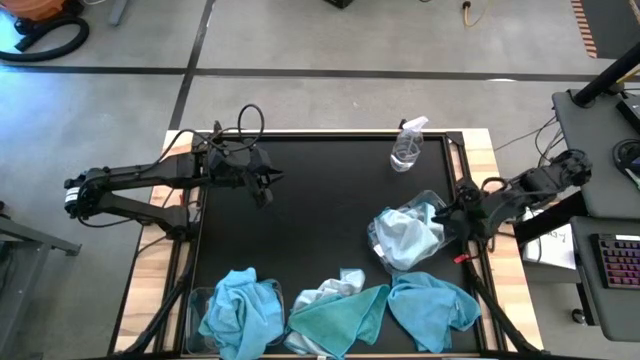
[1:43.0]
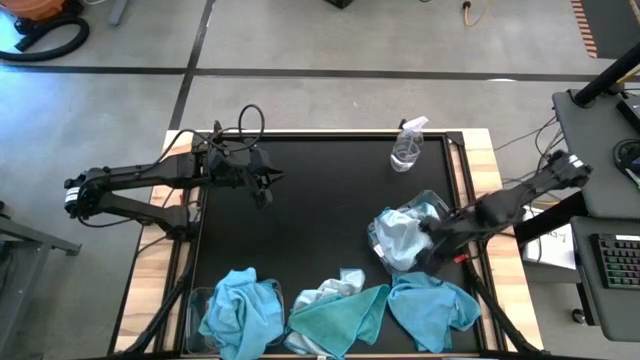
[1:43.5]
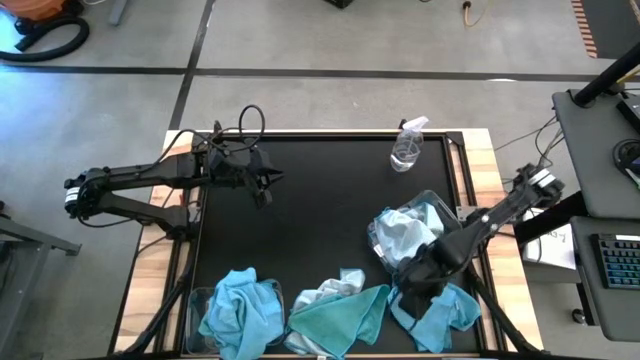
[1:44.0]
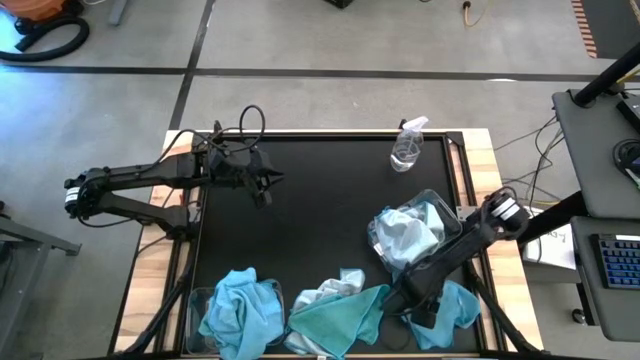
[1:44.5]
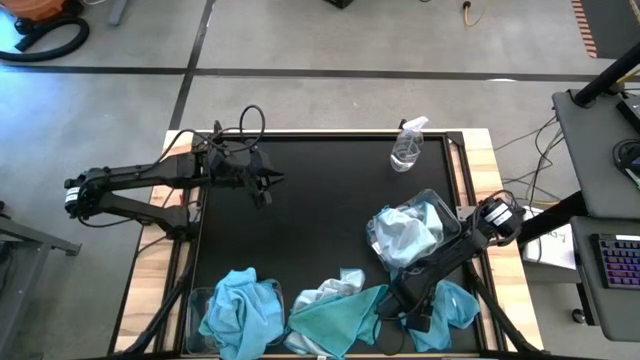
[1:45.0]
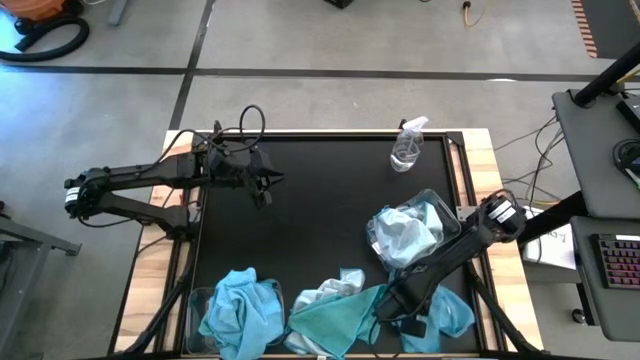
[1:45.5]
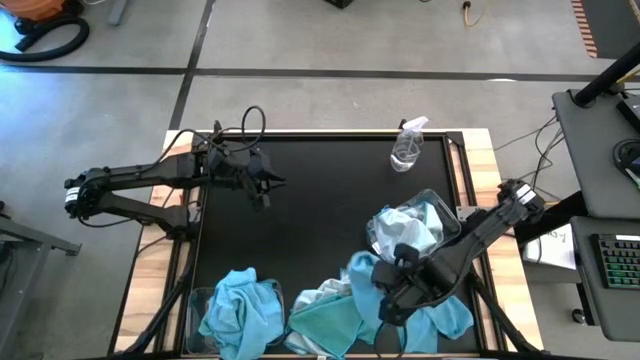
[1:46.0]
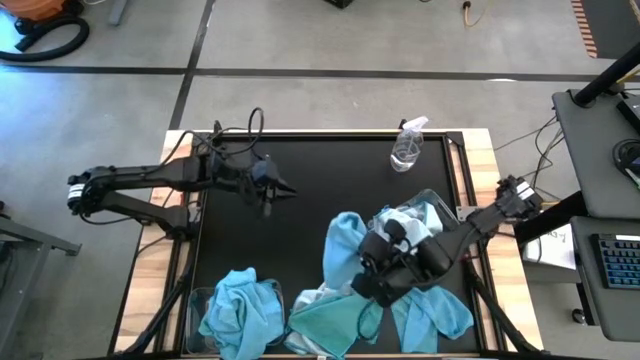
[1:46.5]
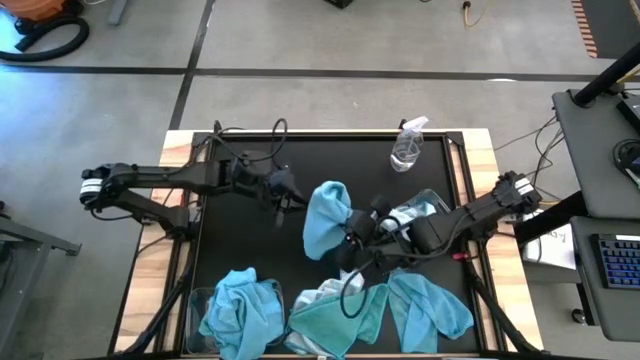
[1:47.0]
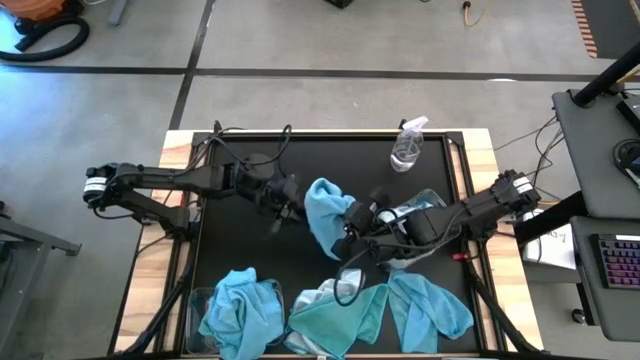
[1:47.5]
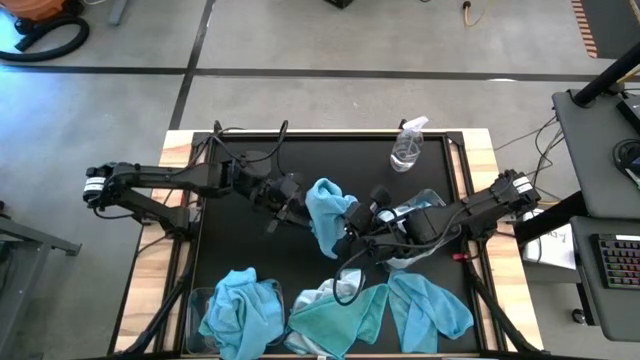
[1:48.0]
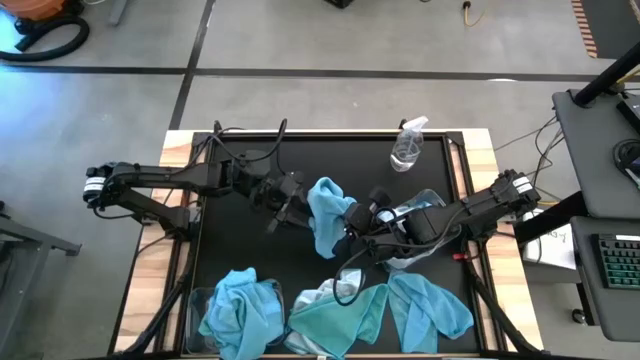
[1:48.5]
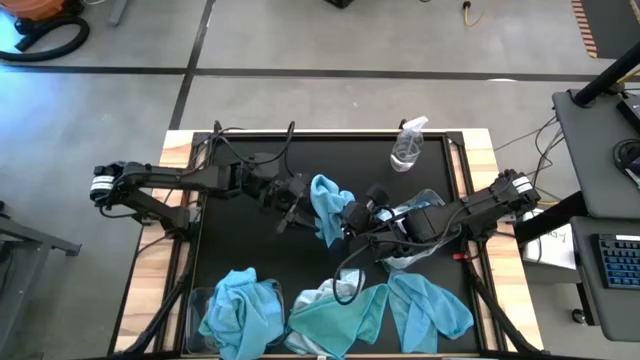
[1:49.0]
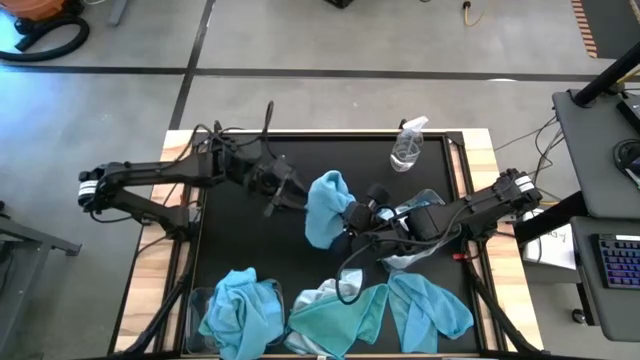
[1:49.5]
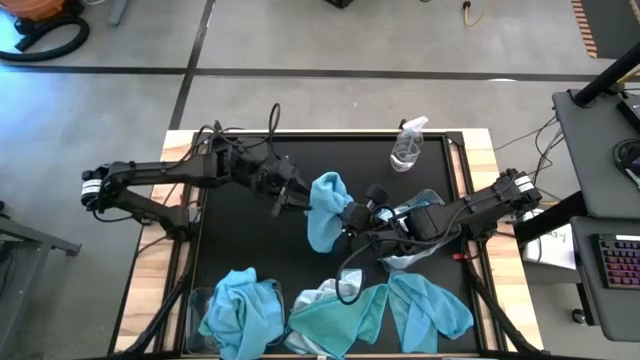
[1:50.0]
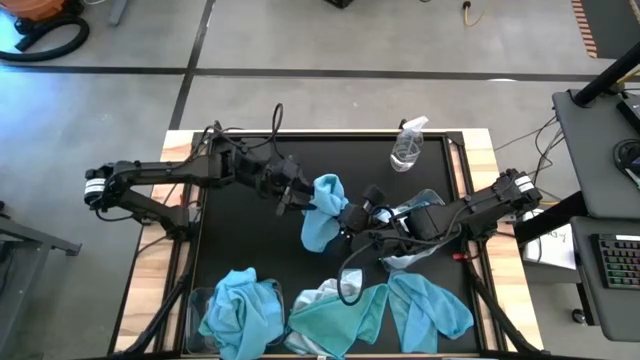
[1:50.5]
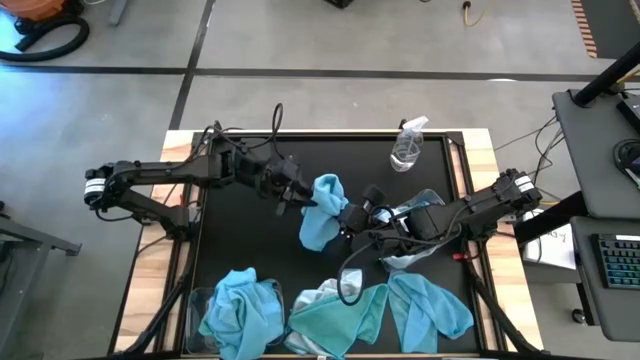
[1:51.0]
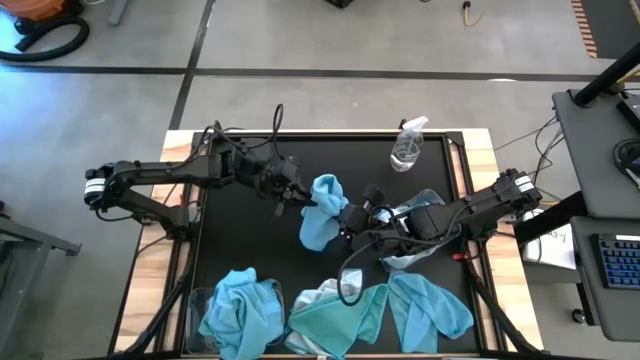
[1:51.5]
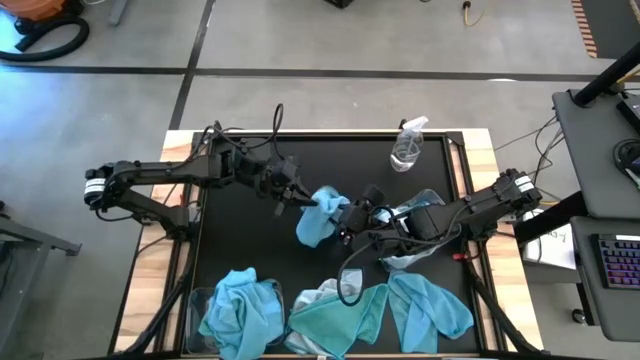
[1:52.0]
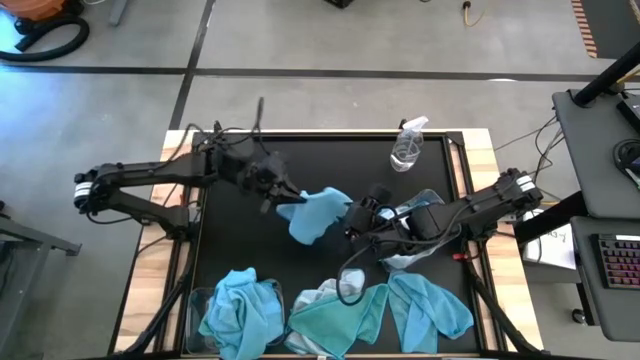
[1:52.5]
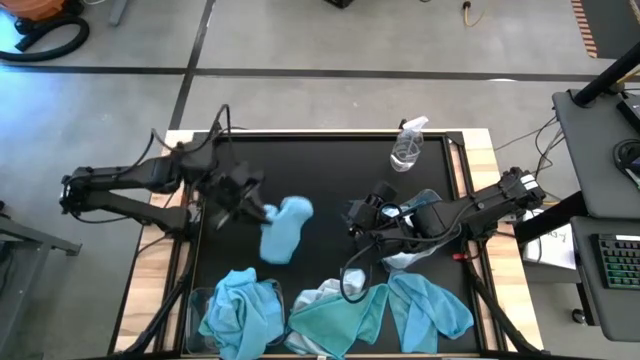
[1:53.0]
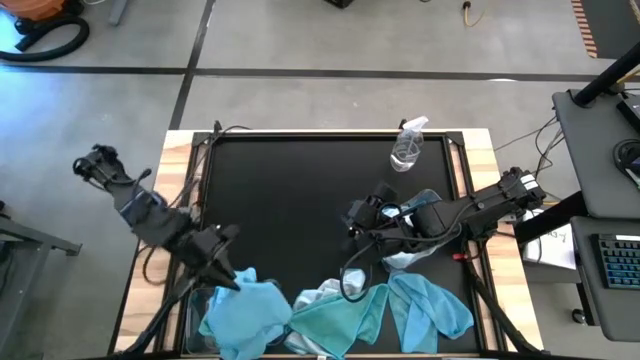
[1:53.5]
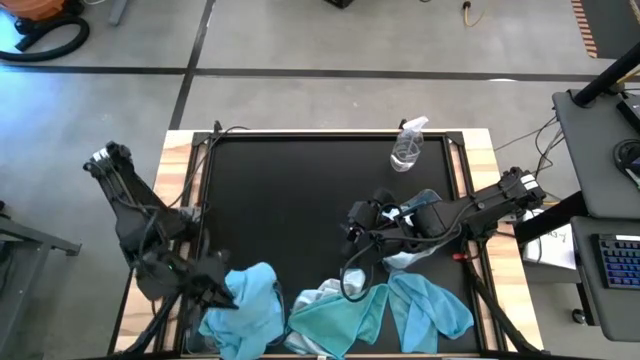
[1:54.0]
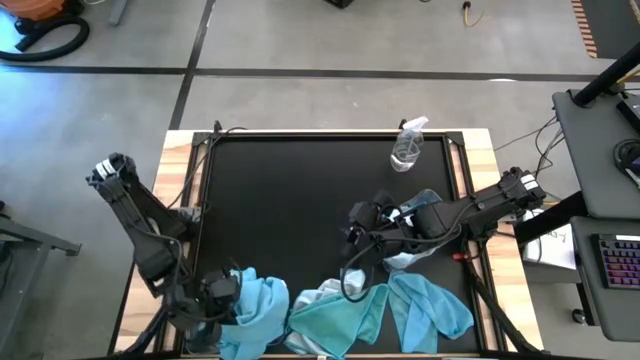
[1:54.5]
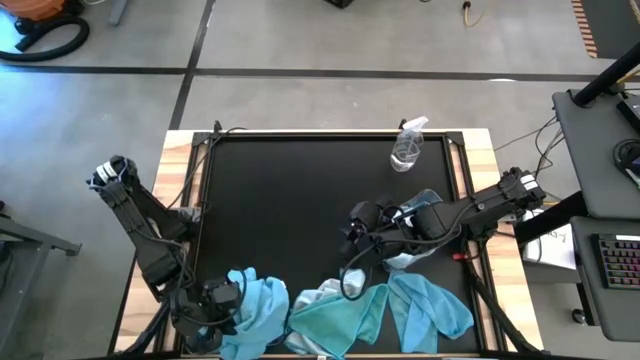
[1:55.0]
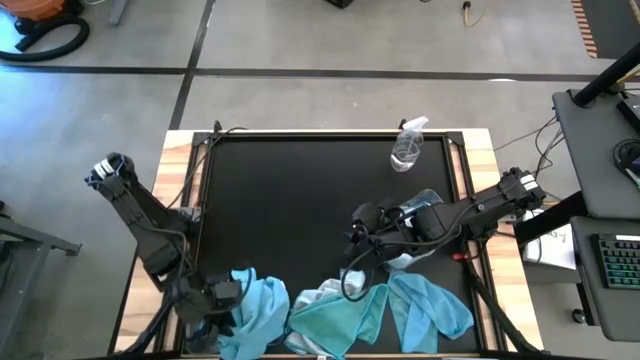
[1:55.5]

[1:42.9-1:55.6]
Task: Sort microfiber towel by color & place in baskets
Put the blue towel into the bottom transparent bin

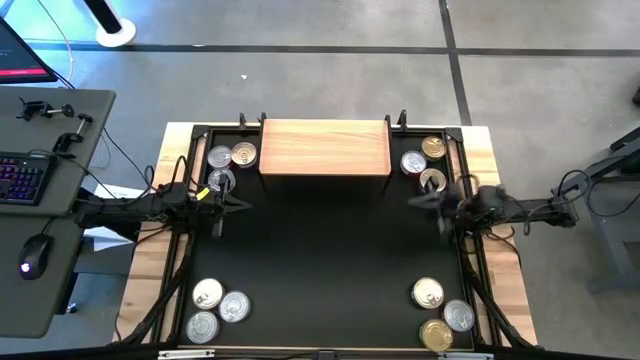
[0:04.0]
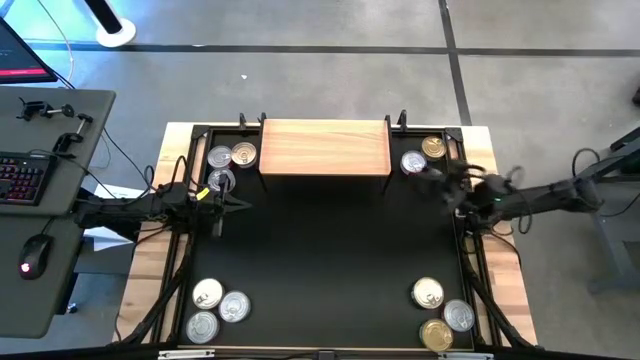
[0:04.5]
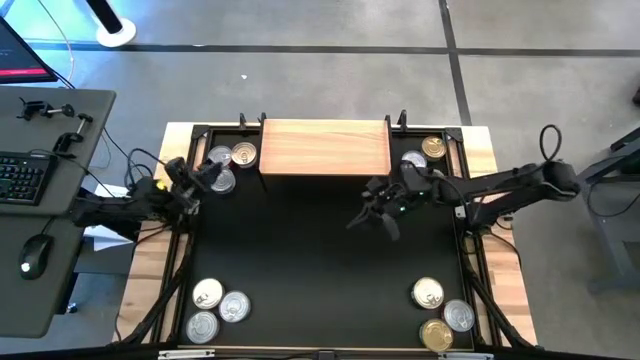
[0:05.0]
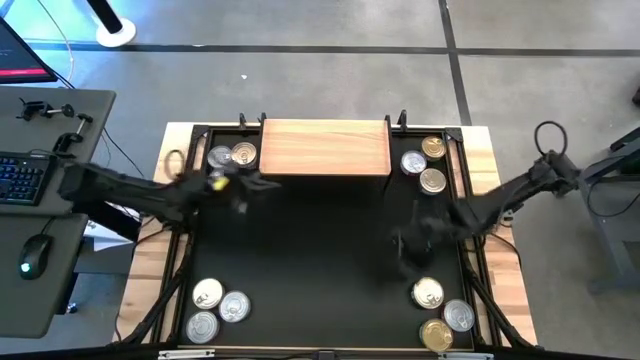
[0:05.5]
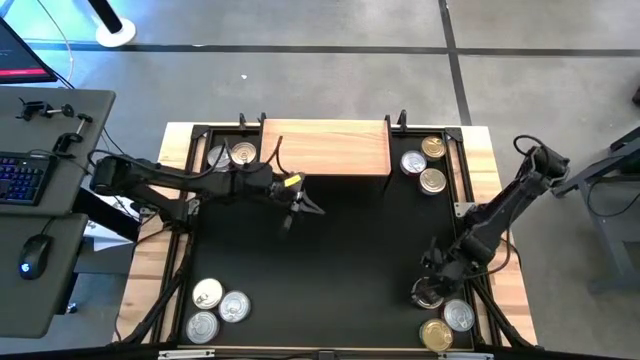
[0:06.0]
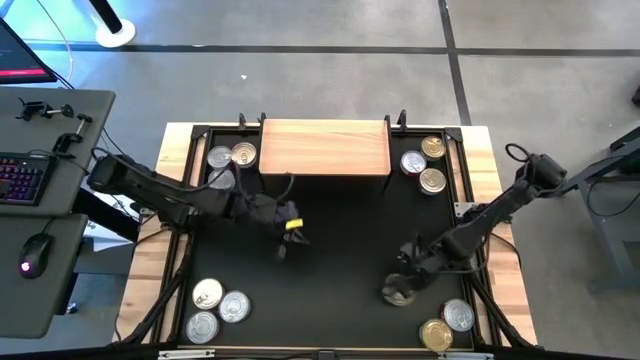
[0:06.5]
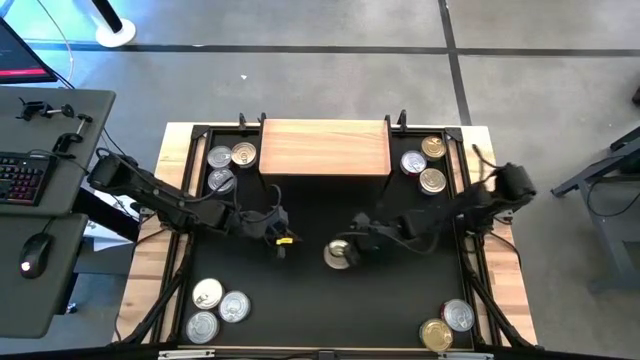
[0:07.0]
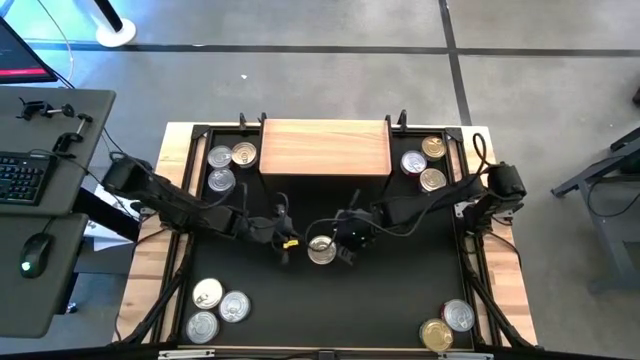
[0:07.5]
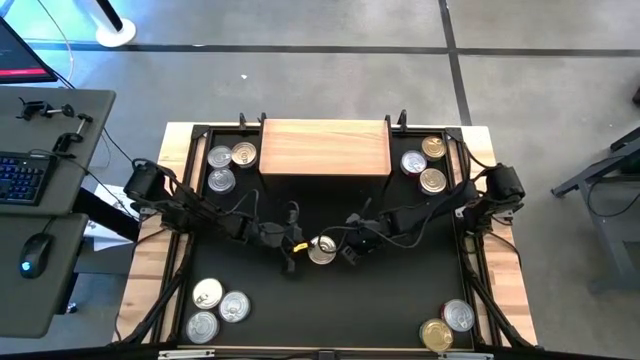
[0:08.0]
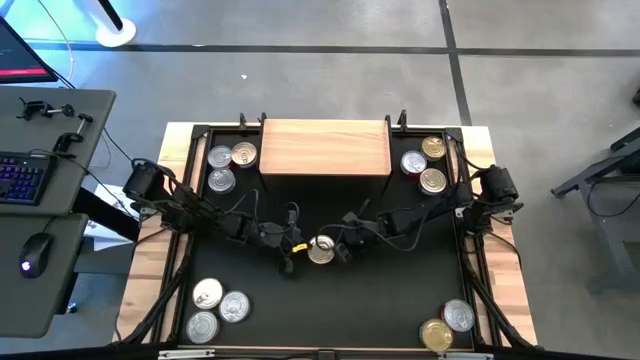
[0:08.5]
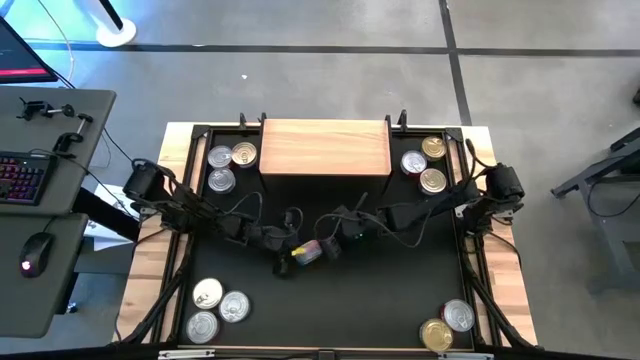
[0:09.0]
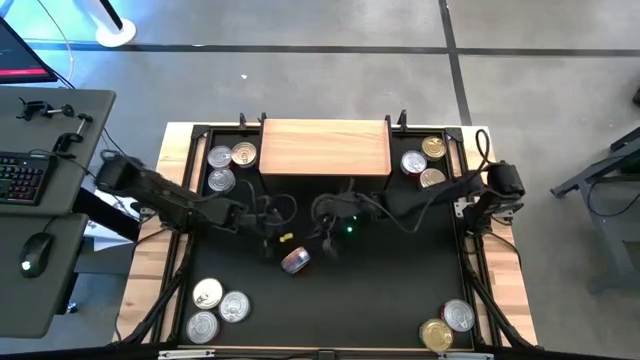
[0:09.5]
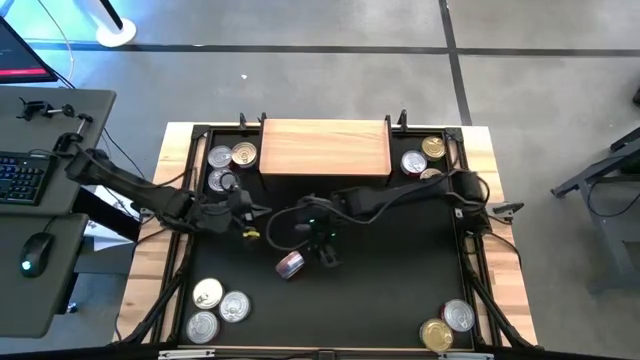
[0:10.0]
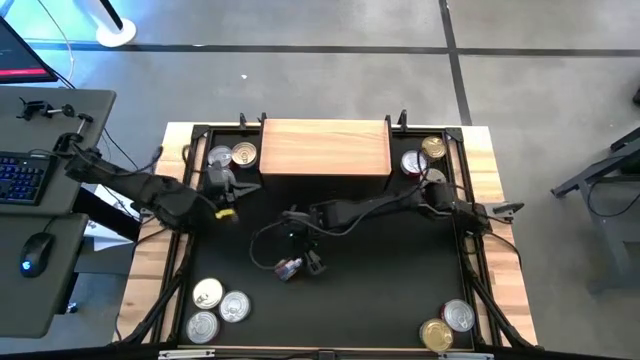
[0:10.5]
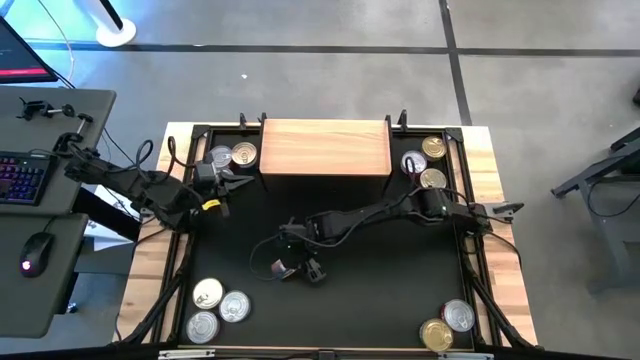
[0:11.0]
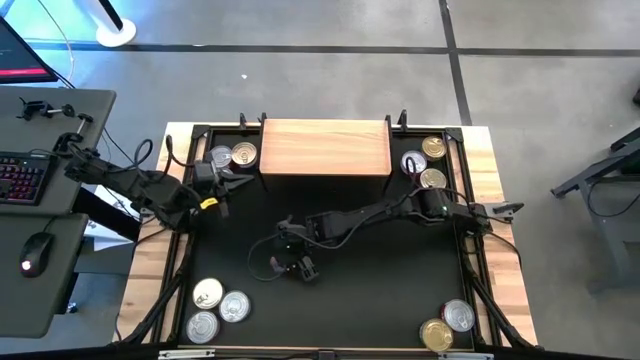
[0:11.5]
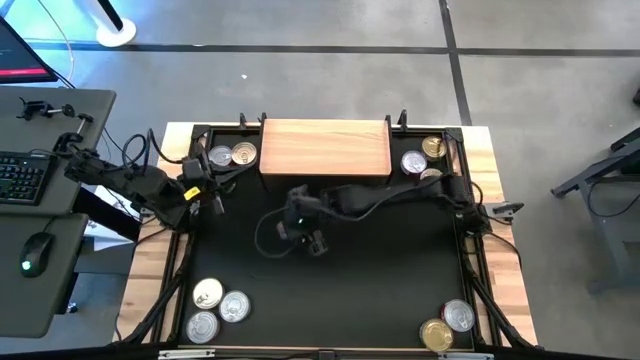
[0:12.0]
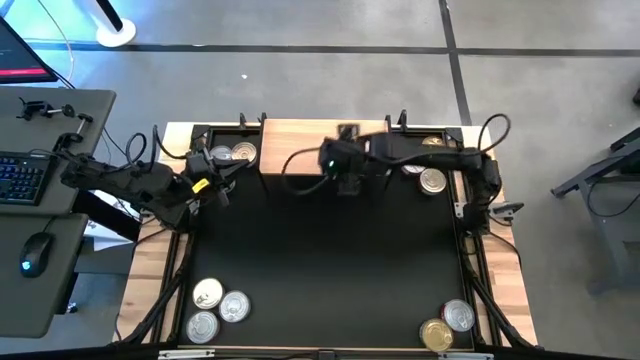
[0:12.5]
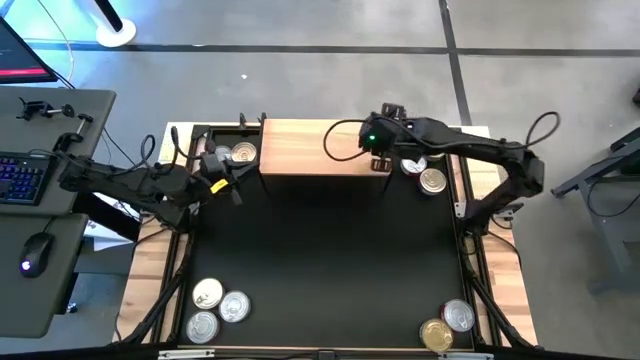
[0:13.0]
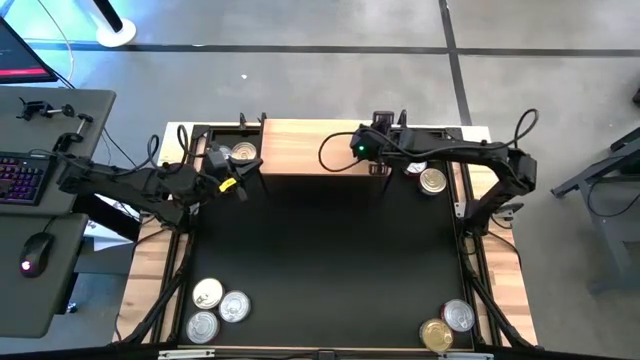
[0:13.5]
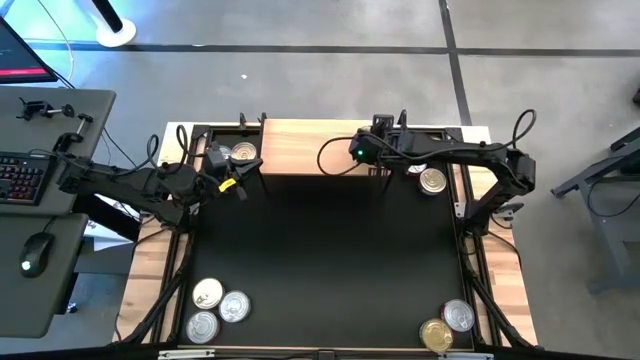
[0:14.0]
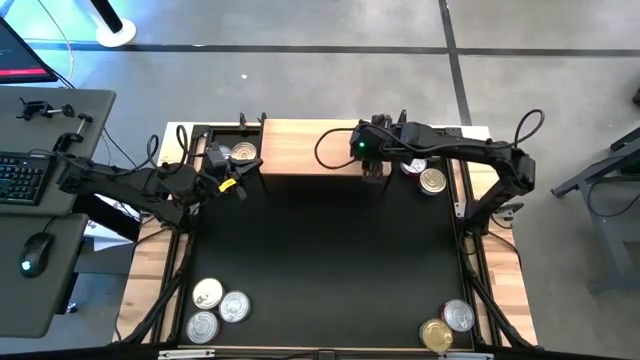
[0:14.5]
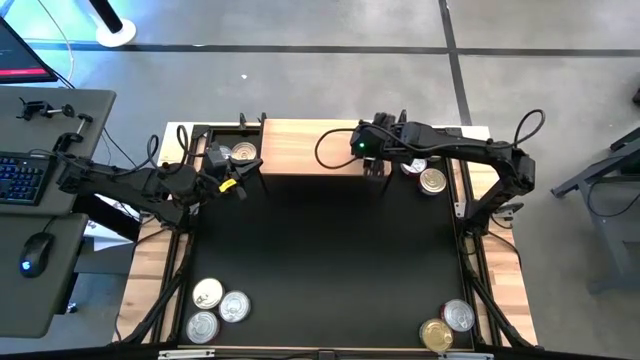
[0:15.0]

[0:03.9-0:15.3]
Task: Stack canned seafood by type on shelf
Put the bottom right blue tuna can on the shelf
